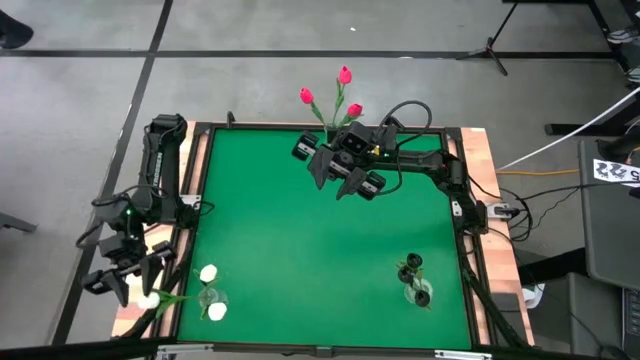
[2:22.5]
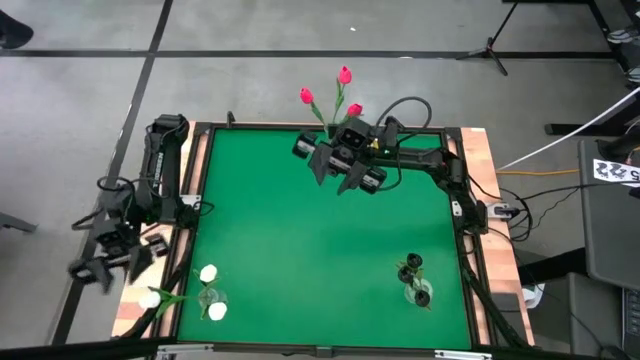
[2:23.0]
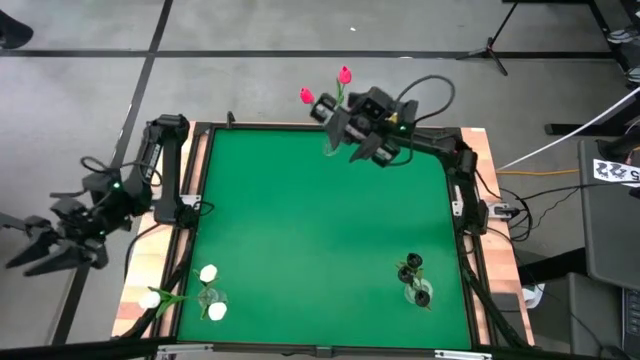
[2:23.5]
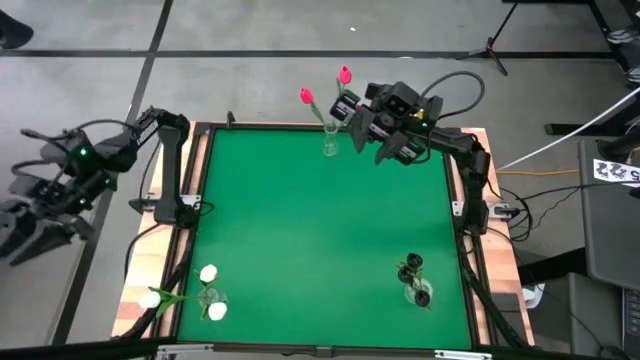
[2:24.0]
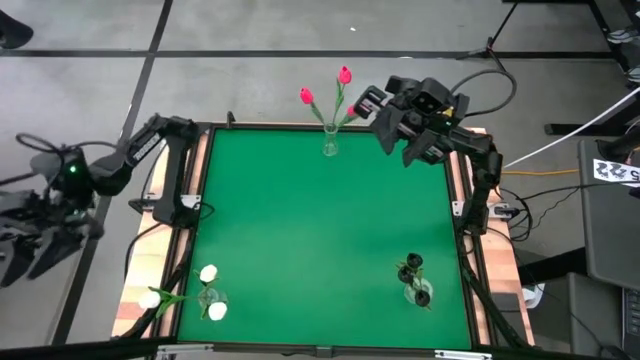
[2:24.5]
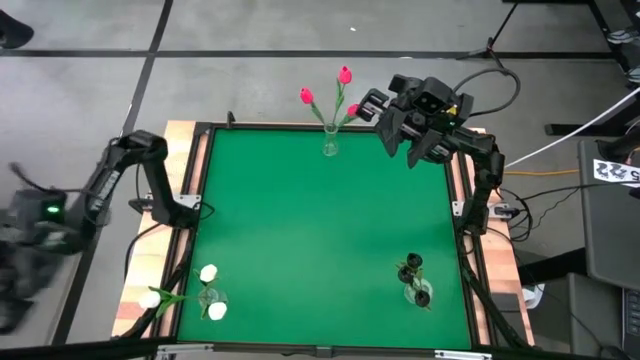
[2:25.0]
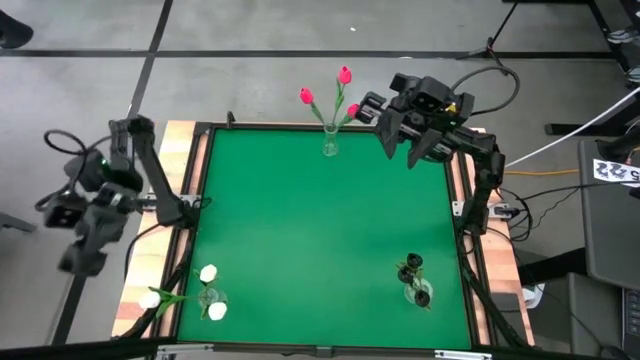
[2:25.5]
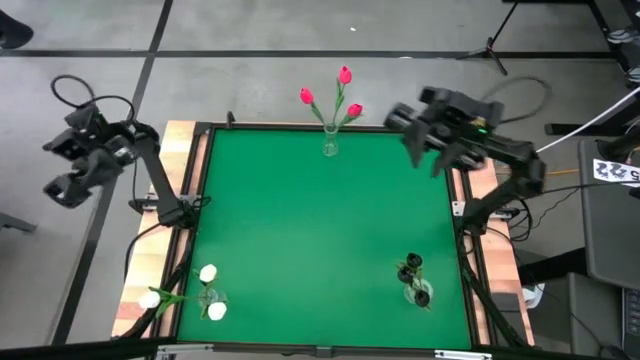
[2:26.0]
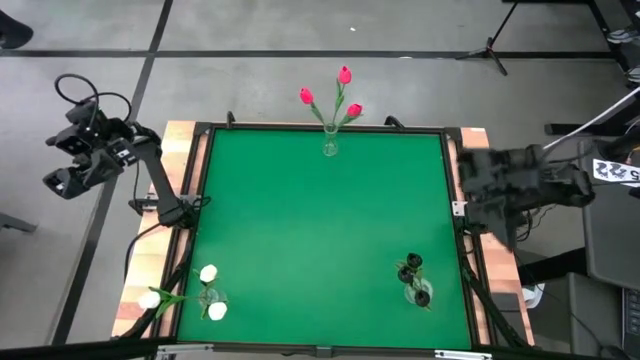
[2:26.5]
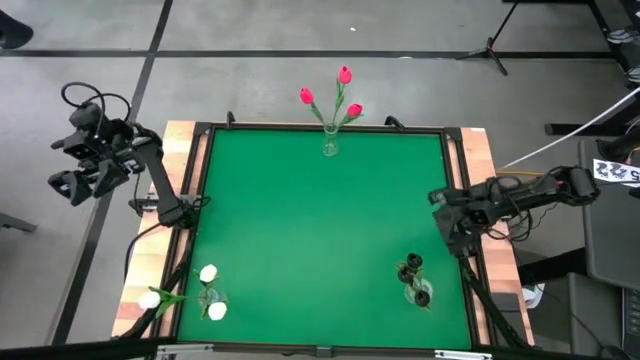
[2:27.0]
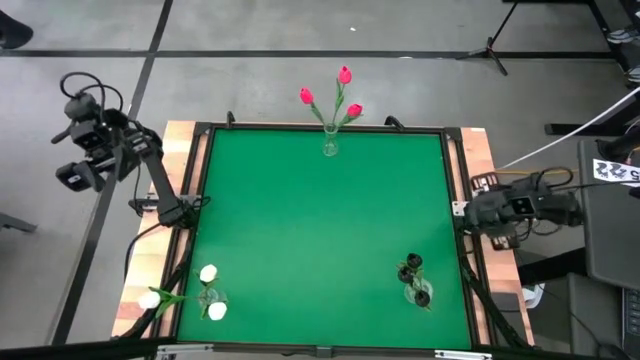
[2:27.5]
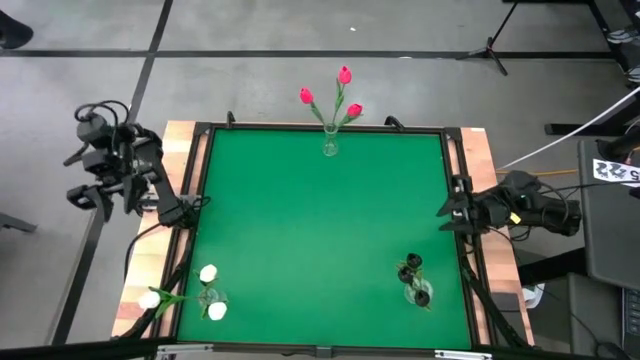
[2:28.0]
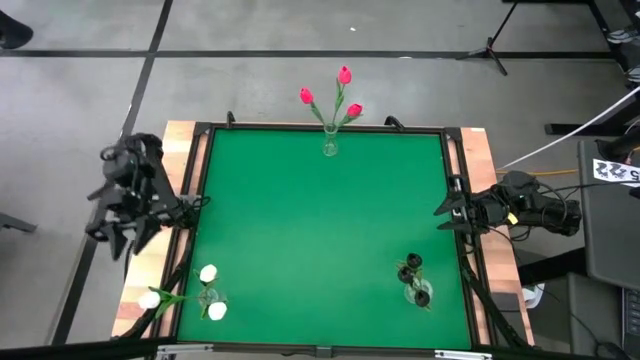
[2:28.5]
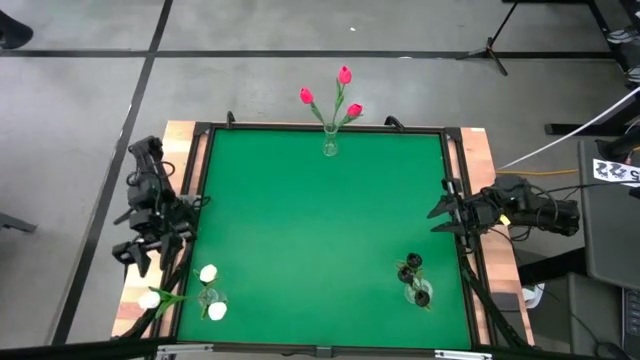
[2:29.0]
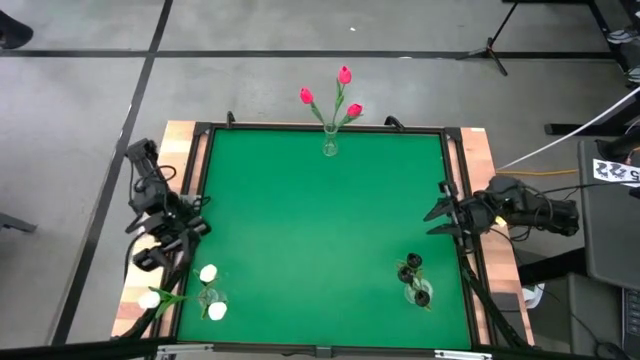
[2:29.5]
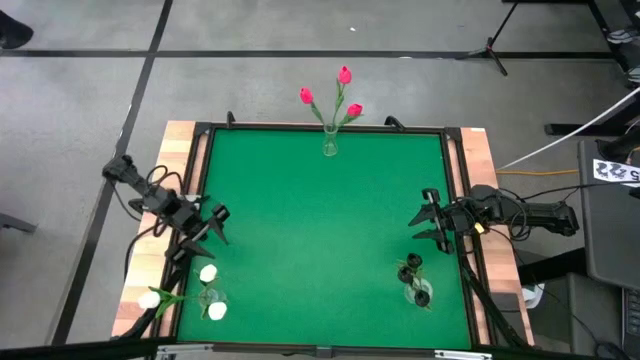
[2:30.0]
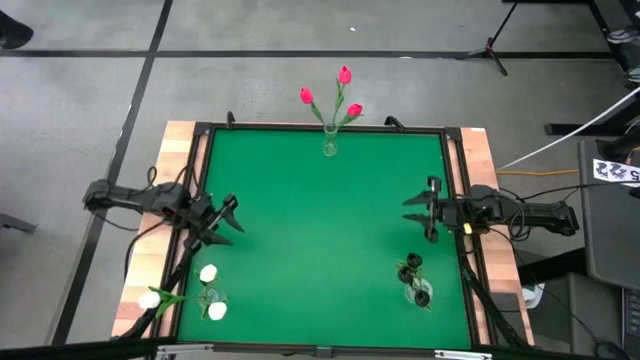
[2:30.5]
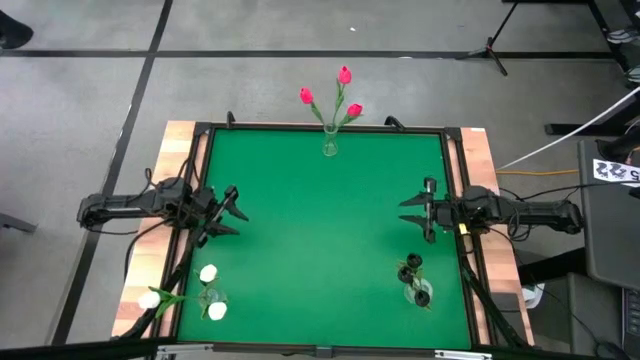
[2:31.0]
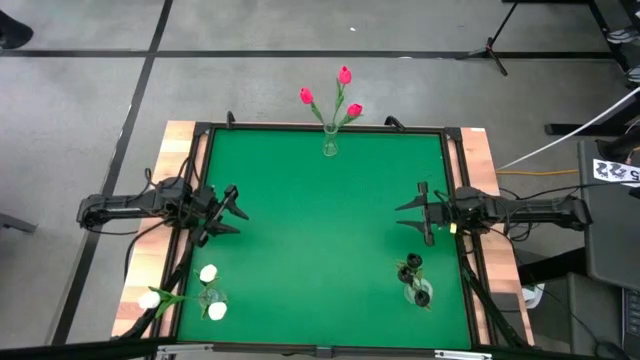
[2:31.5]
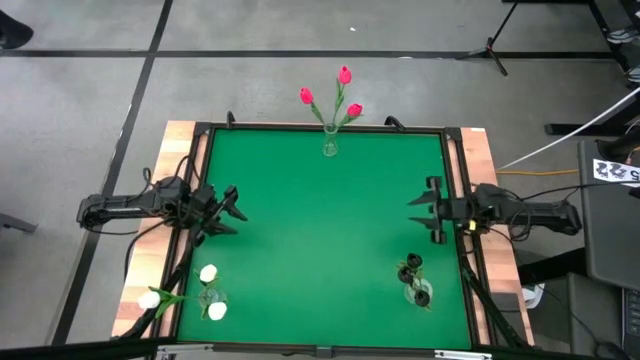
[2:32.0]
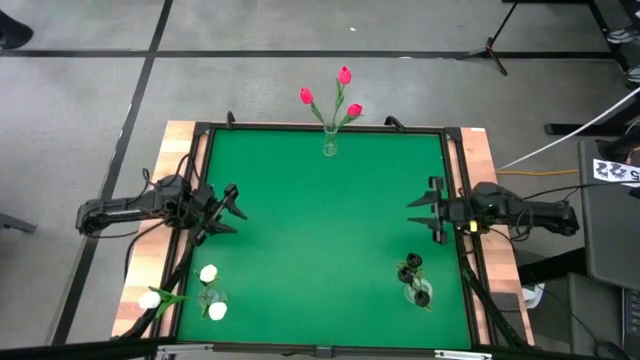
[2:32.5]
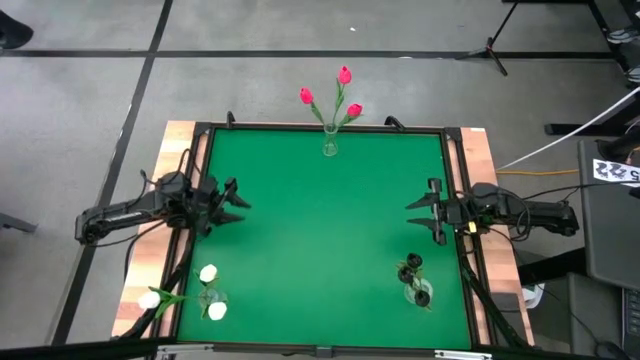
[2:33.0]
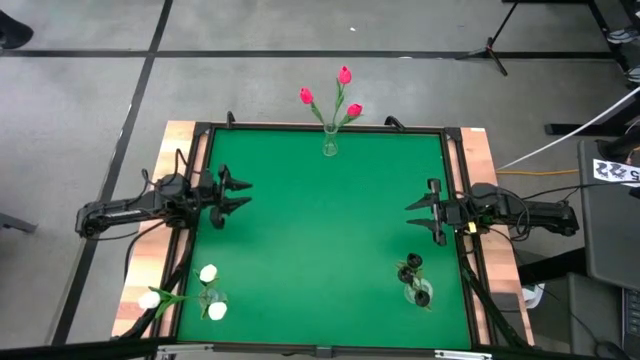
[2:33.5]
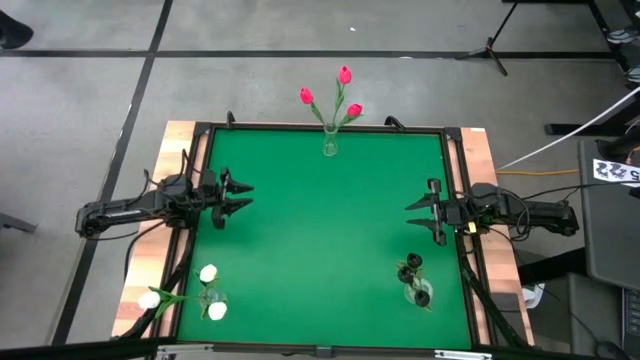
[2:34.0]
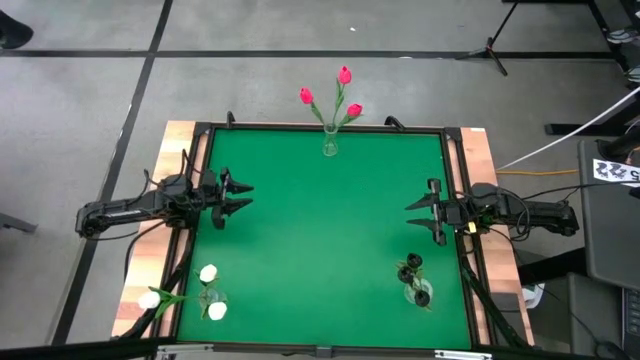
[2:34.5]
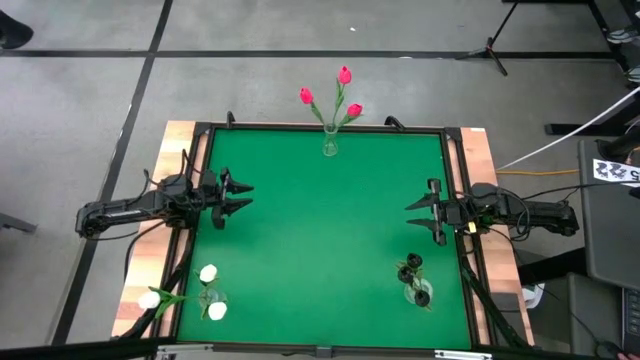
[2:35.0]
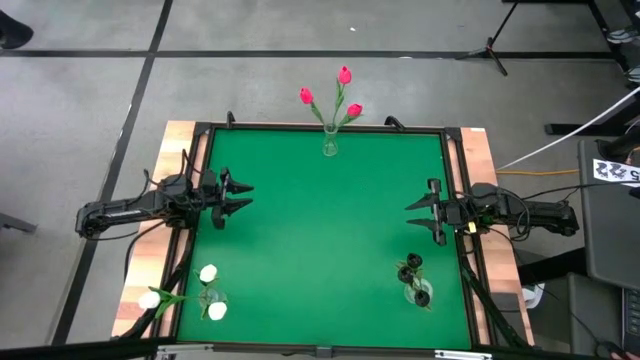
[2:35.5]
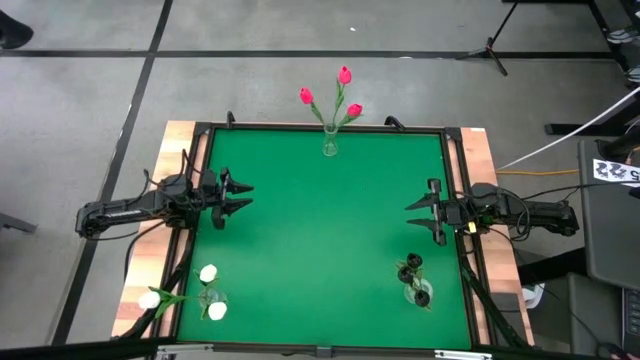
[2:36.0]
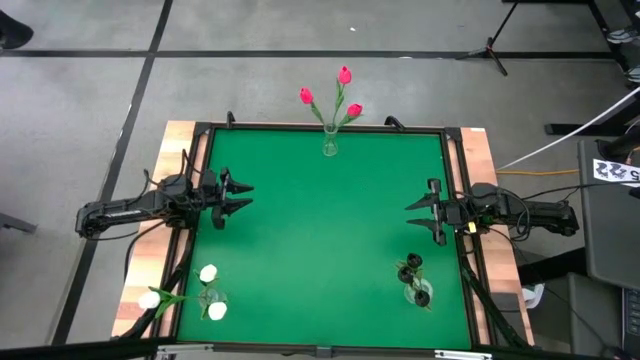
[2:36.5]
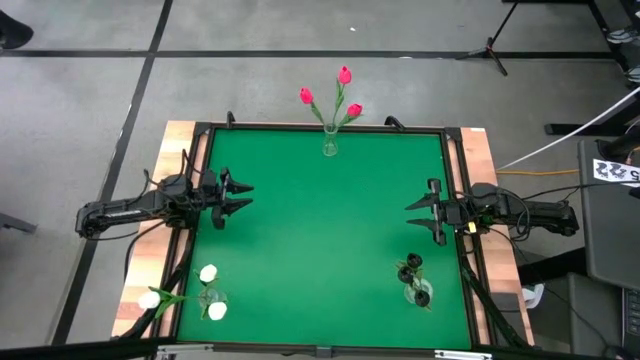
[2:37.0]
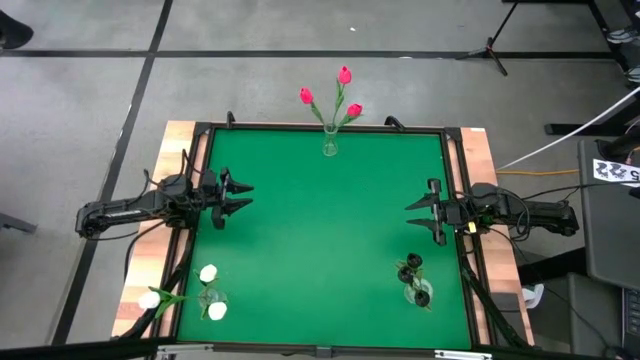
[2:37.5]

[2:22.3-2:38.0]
Task: Sort flowers into vase by color
Return to Home Position

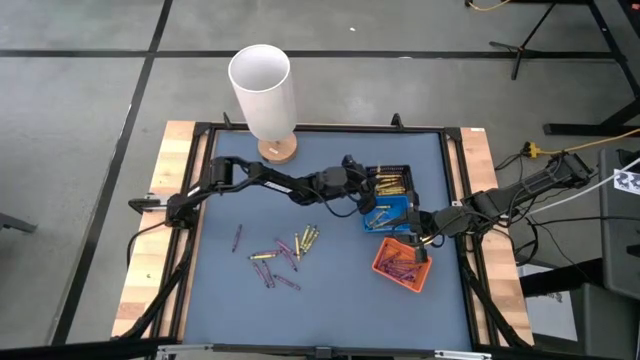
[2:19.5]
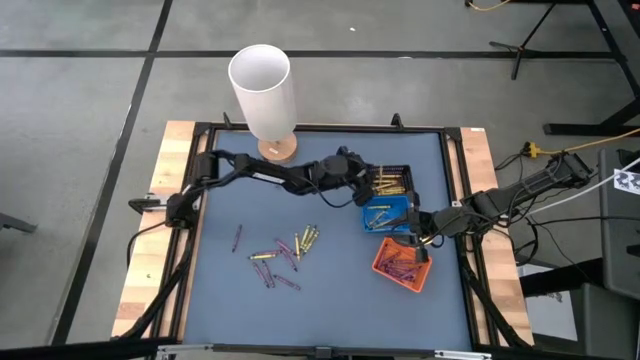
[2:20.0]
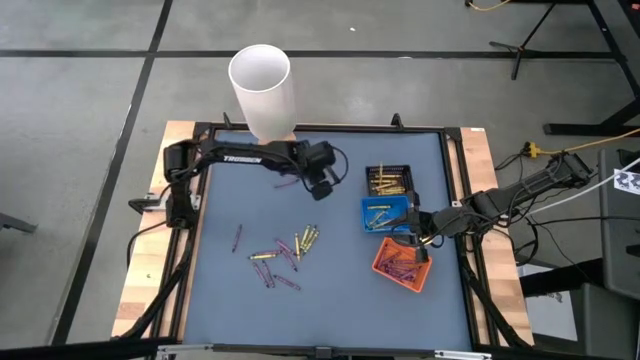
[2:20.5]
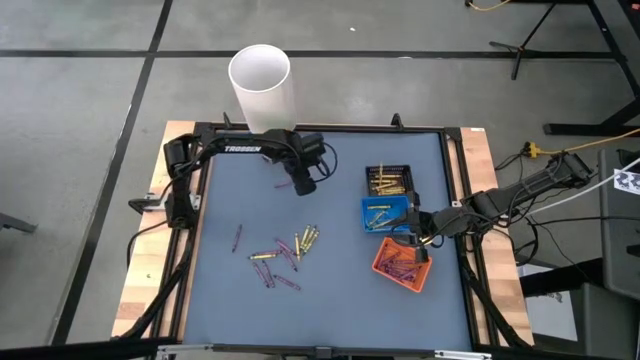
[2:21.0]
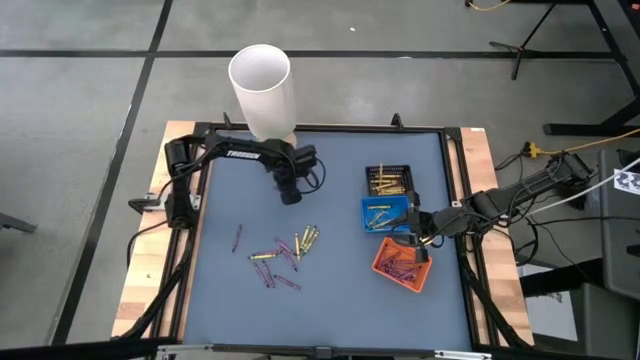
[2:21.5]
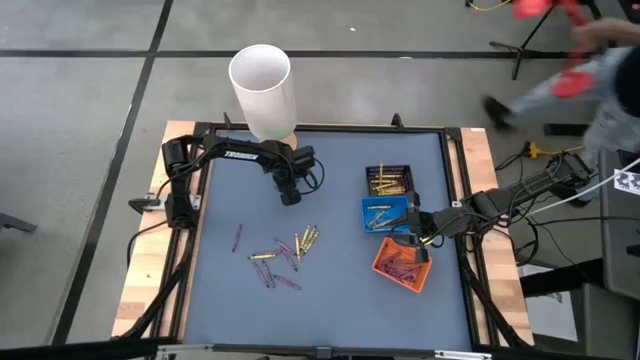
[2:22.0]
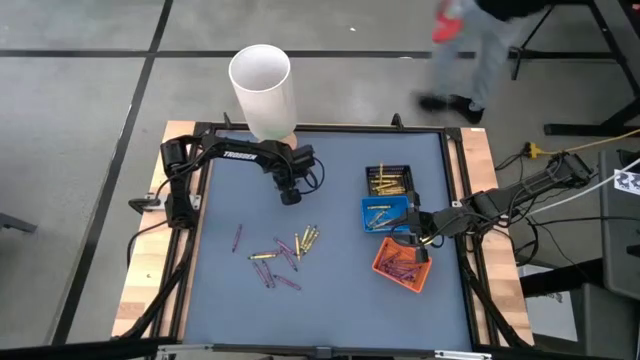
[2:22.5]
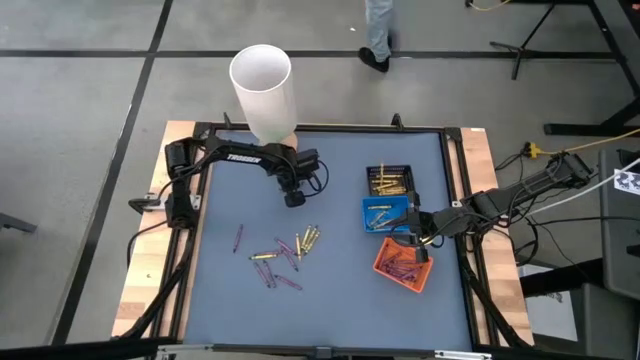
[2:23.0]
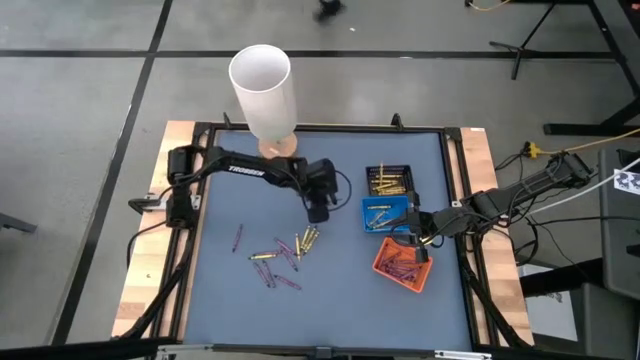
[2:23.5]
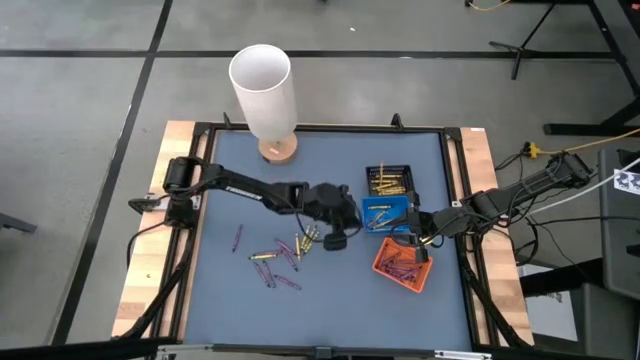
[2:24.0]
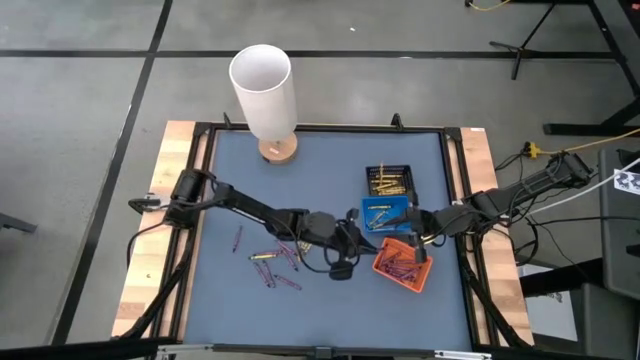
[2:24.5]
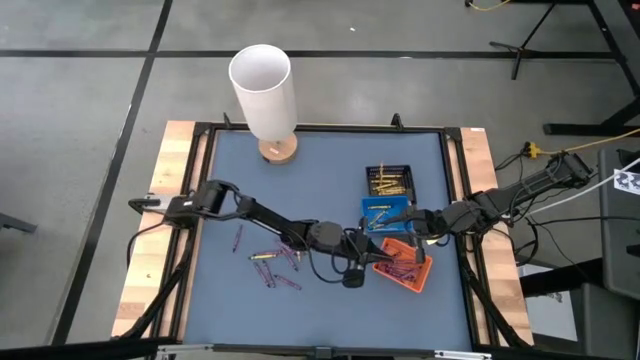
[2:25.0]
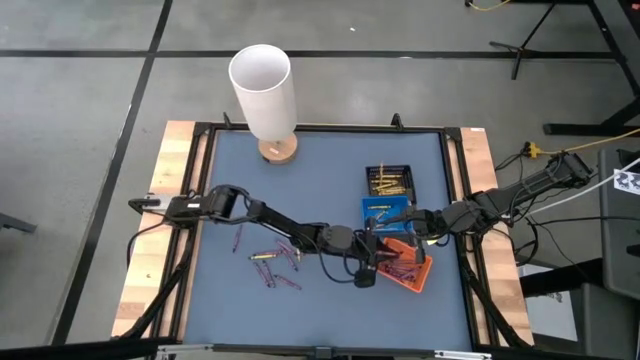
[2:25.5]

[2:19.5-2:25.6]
Task: Sort crayons
Put the purple crayon into the orange bin
